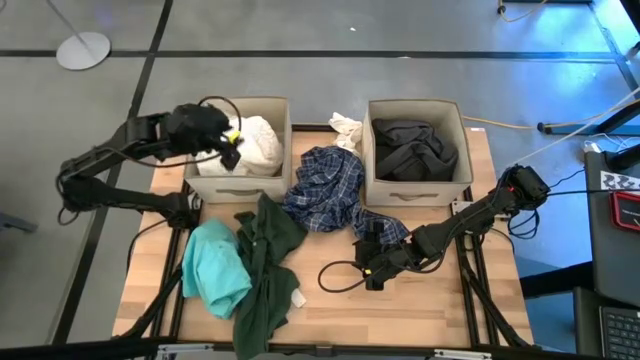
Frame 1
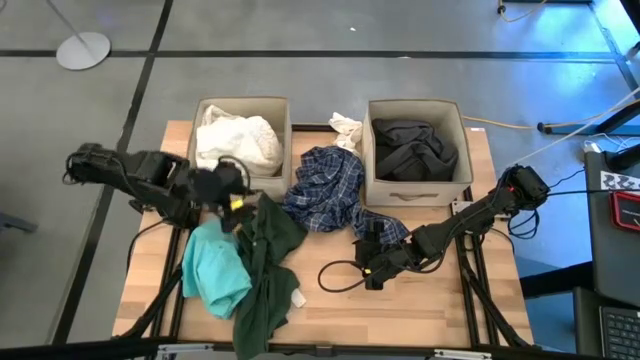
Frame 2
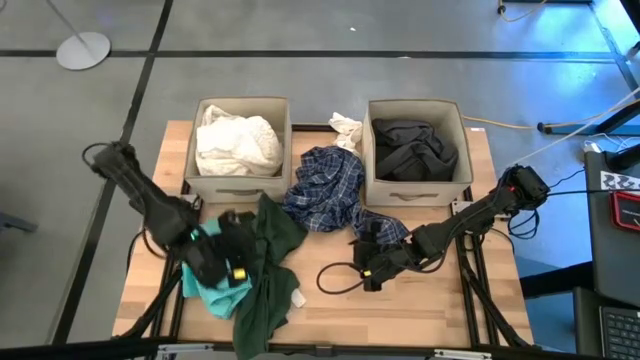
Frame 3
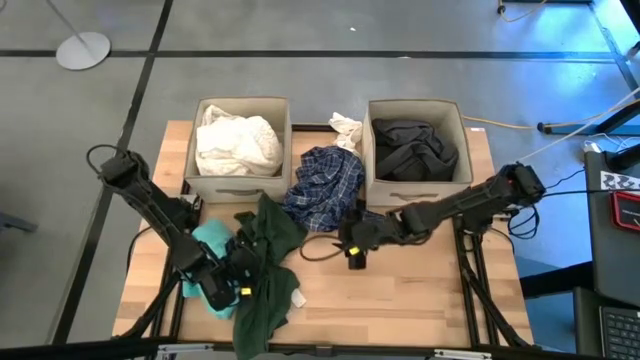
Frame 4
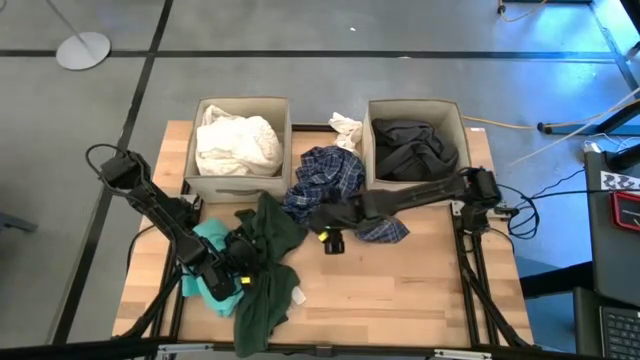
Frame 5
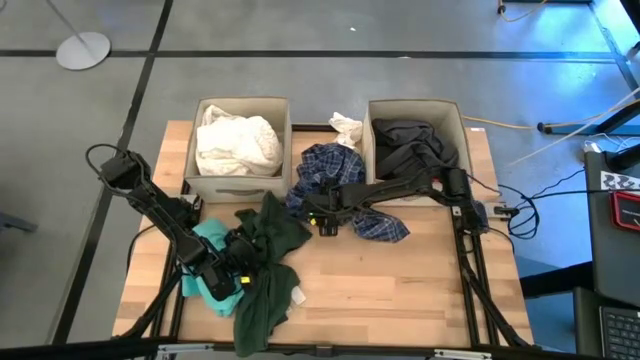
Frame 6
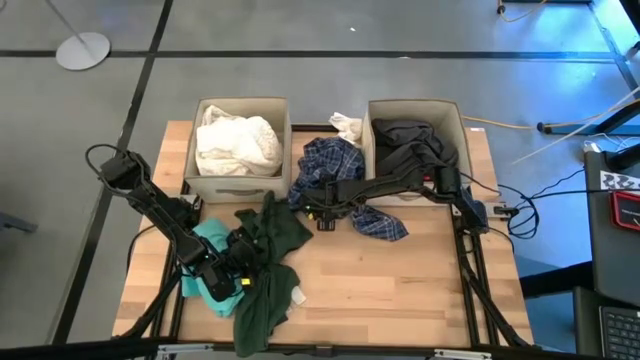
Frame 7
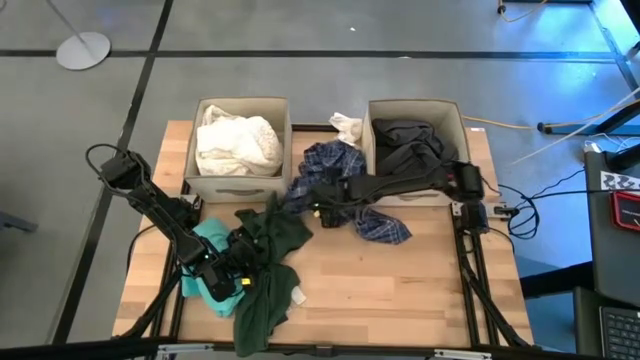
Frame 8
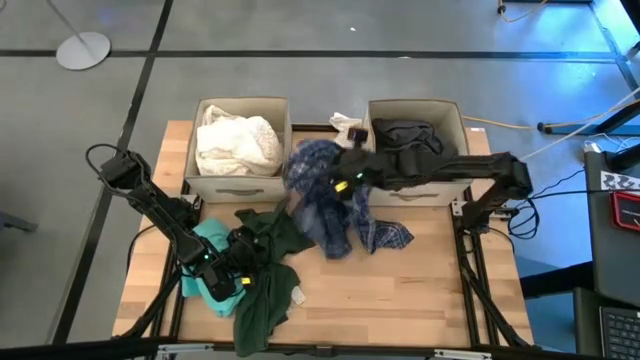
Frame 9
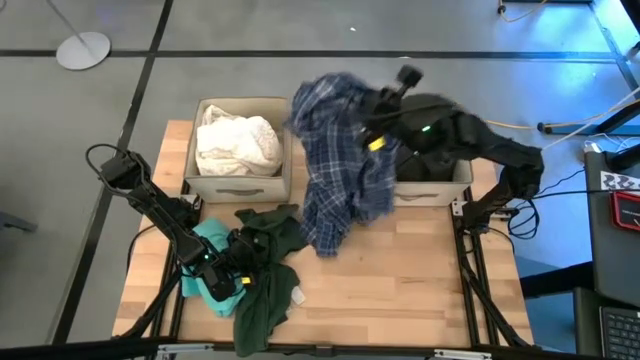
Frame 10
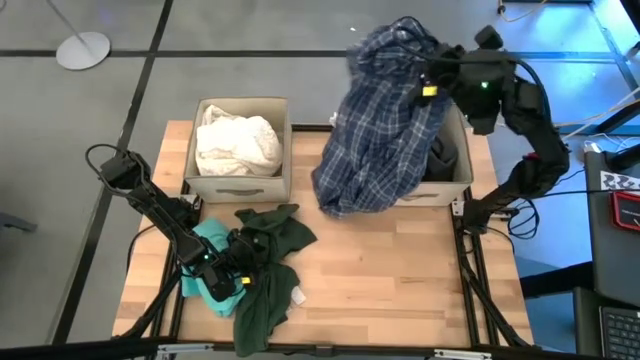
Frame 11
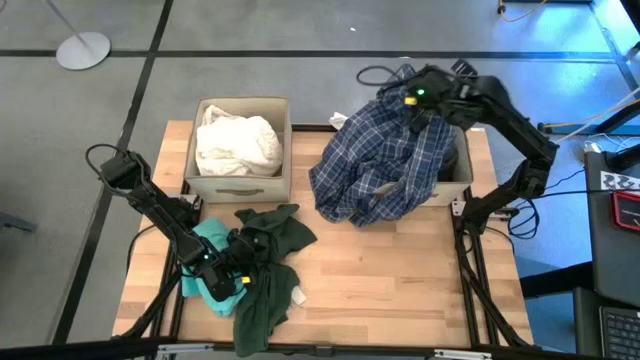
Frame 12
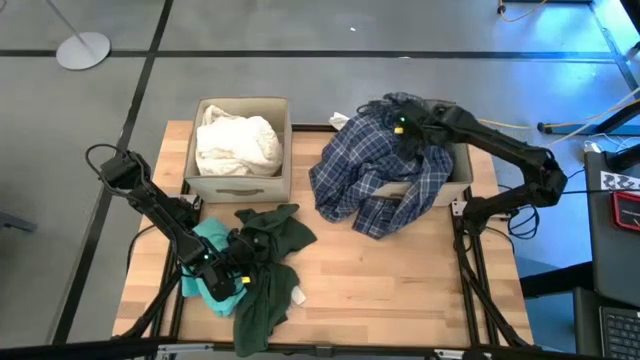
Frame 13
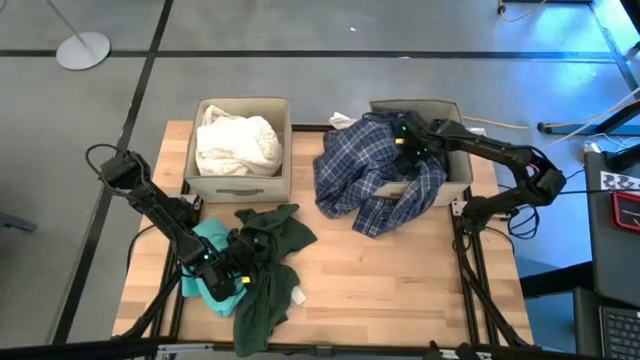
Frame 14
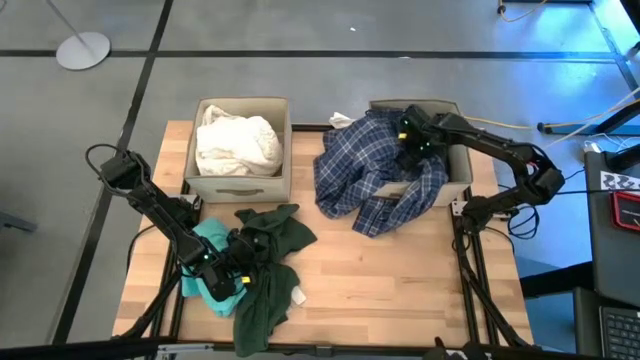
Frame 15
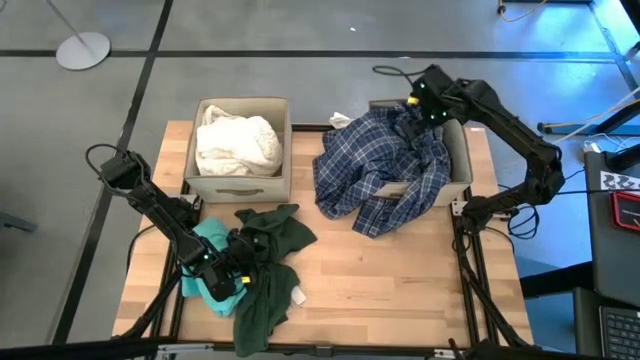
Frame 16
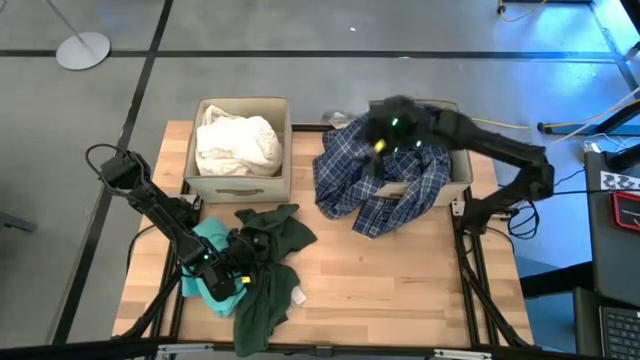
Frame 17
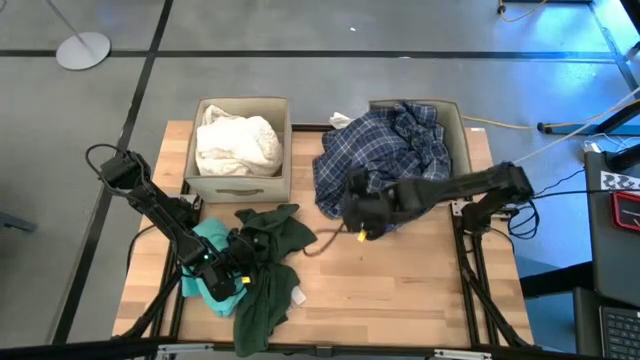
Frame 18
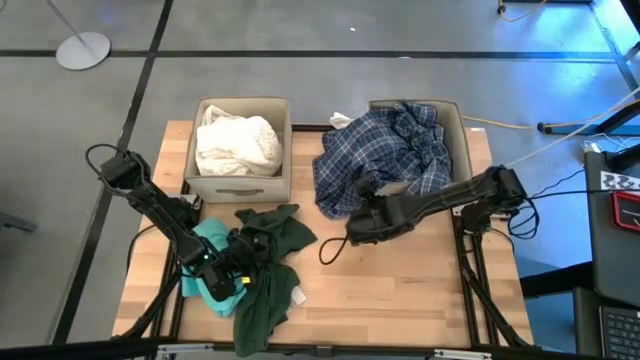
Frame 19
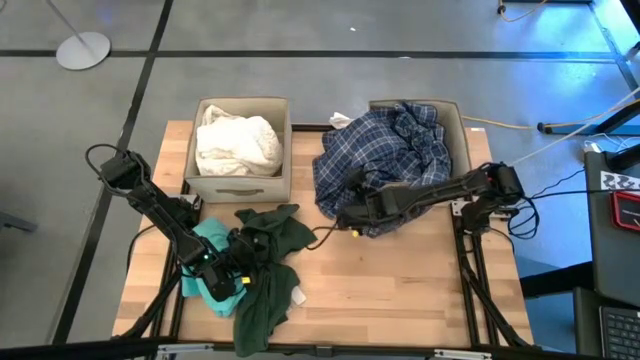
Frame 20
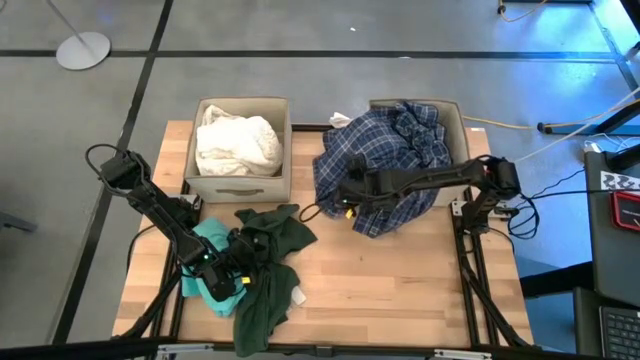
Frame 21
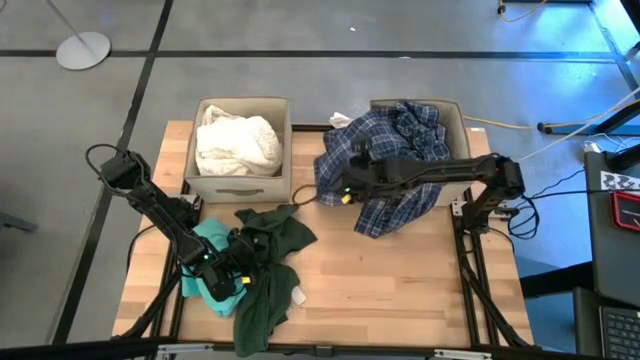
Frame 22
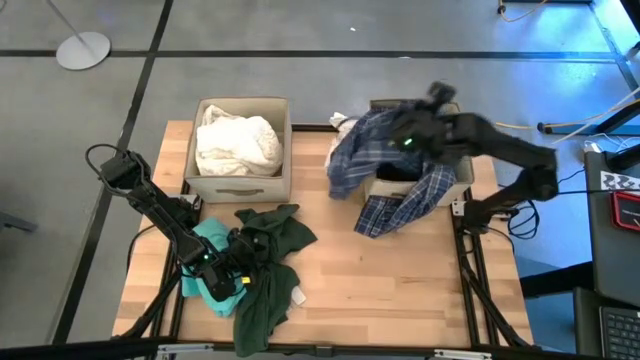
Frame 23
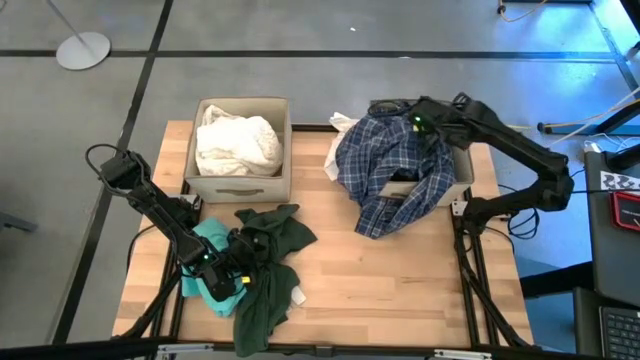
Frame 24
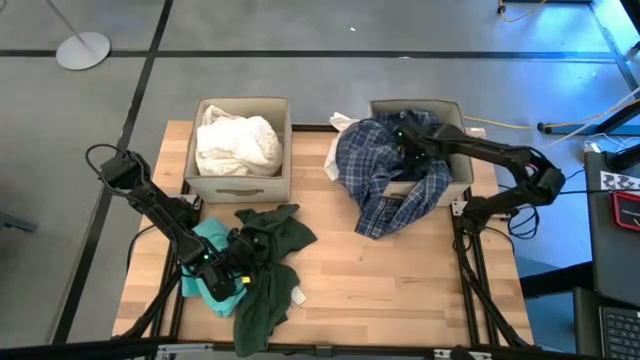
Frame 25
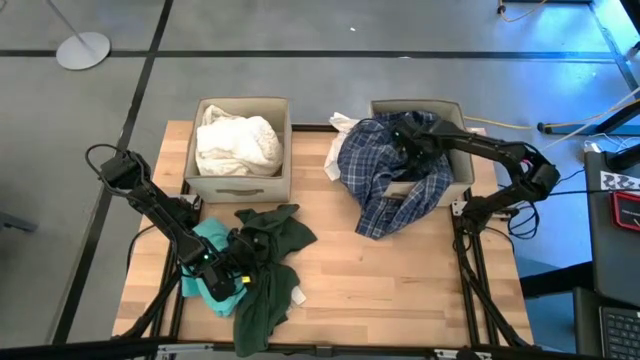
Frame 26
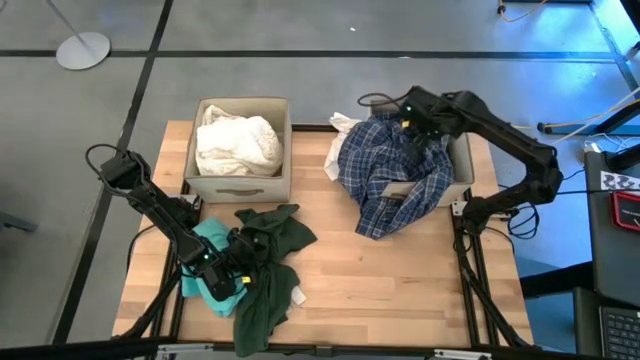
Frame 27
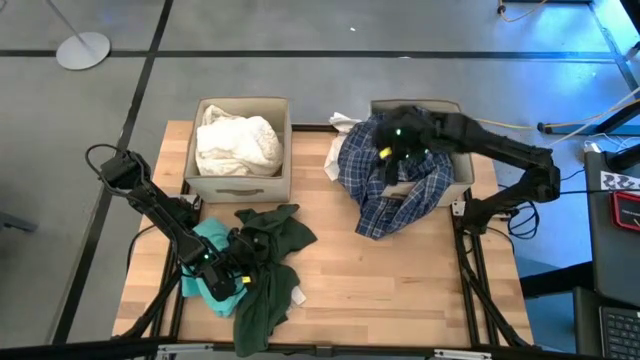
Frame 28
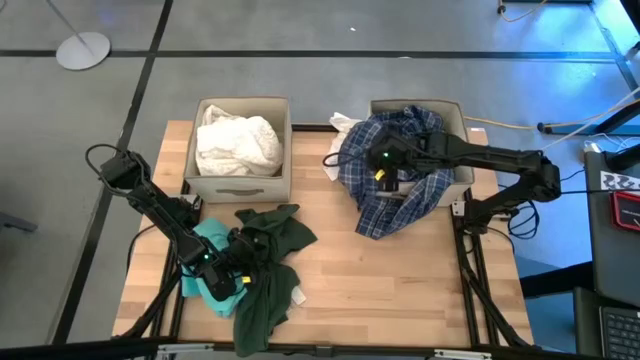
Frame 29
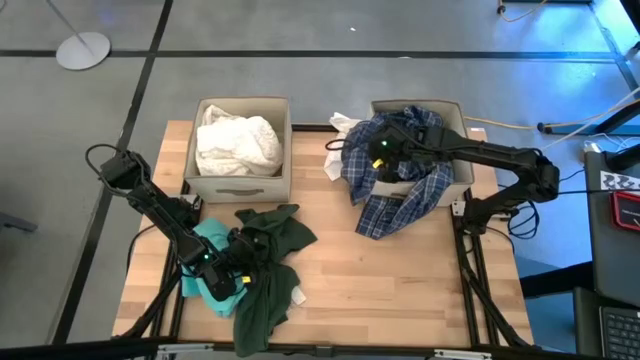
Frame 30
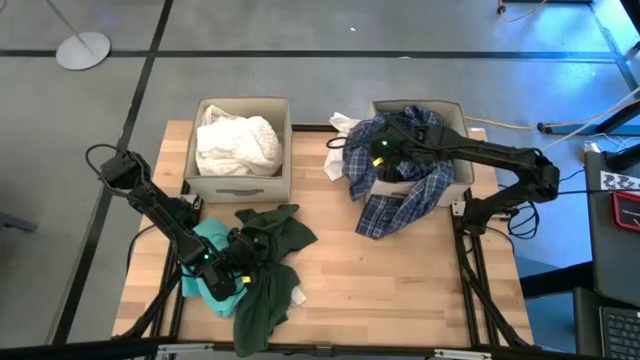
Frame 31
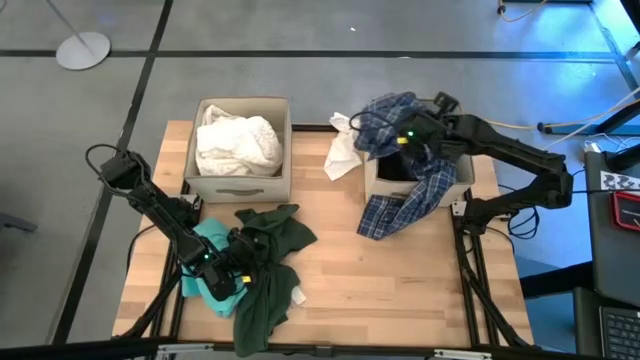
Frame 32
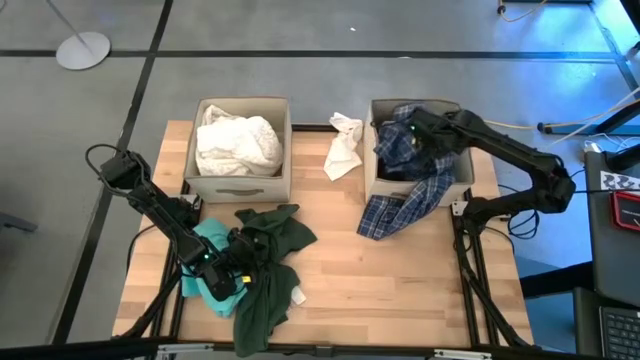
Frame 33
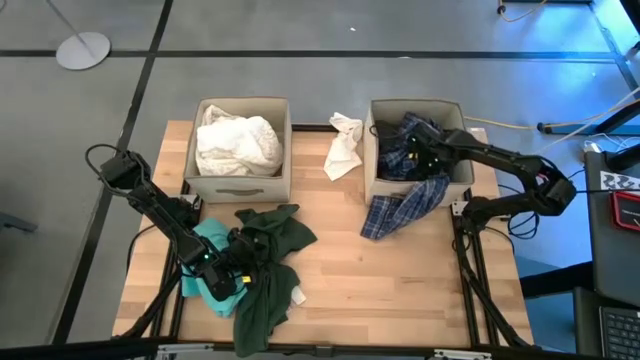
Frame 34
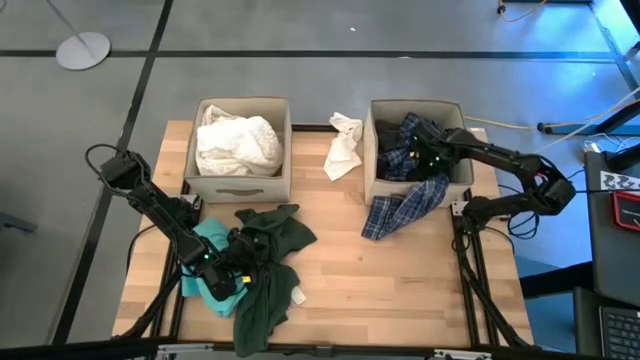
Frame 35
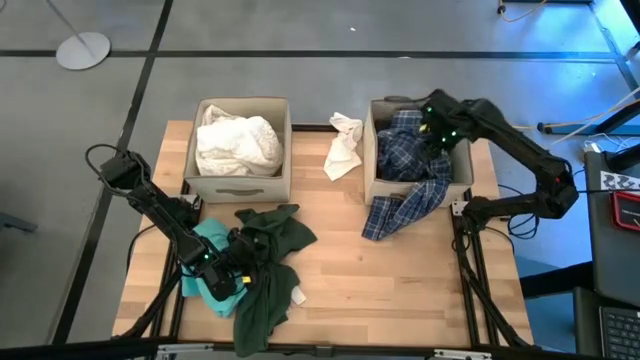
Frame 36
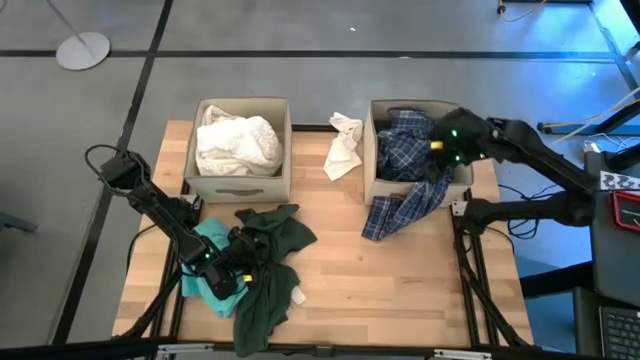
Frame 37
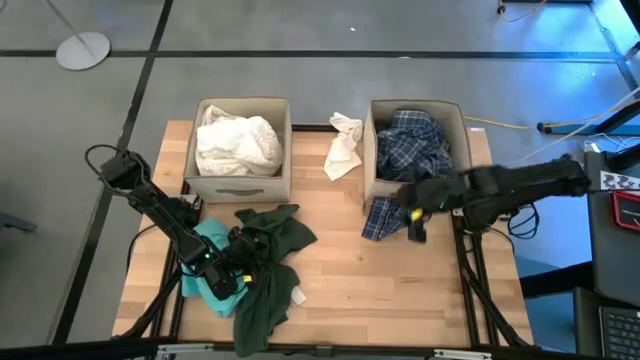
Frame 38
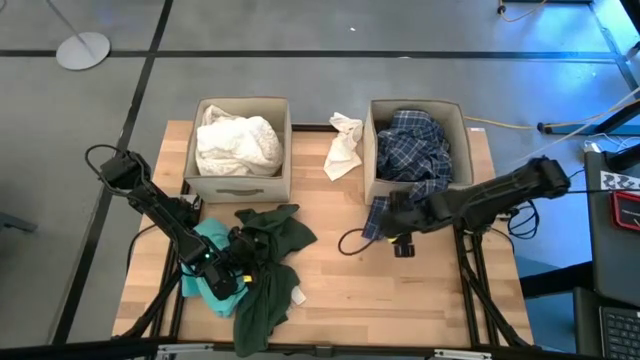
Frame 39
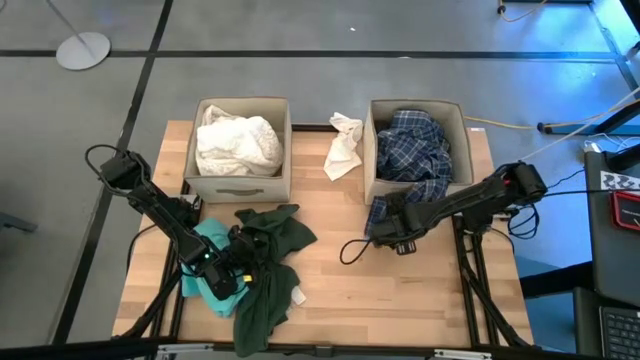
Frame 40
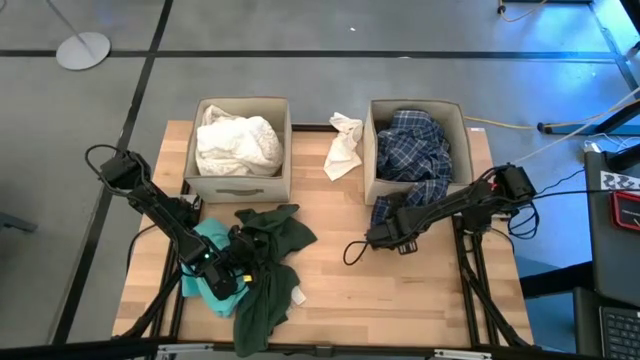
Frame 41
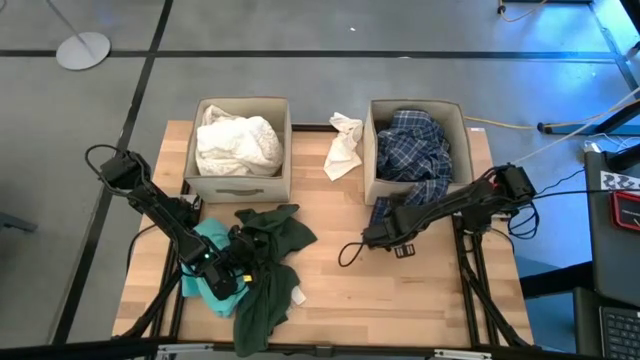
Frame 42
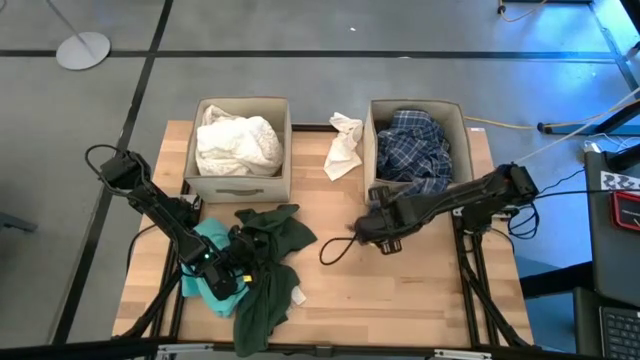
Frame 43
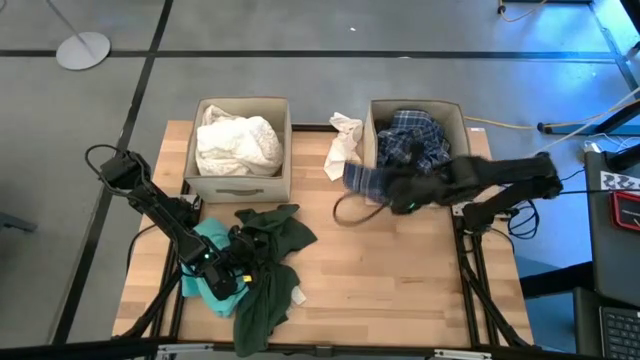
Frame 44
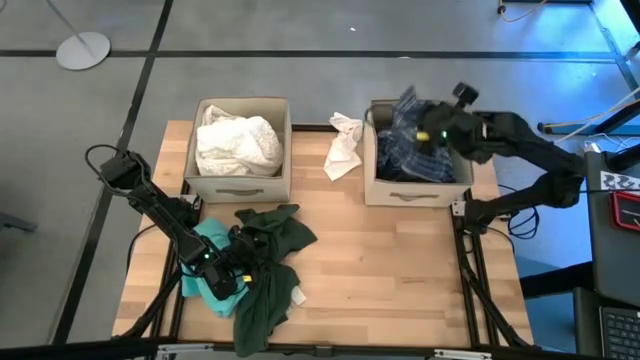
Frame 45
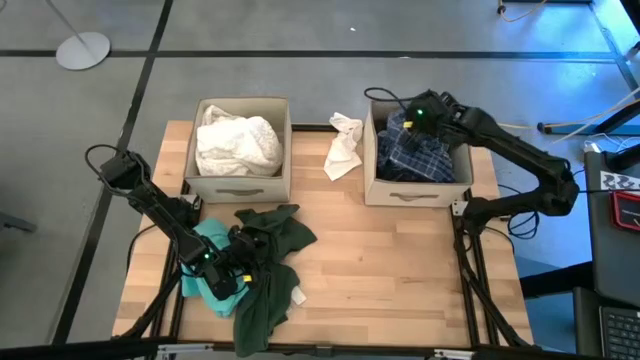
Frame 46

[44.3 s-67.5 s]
Task: Sort clothes
Put the blue jacket into the right brown bin
